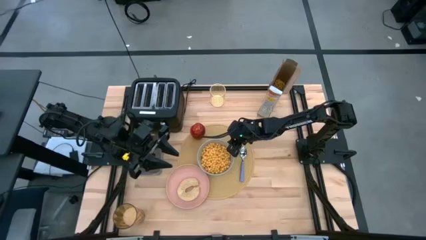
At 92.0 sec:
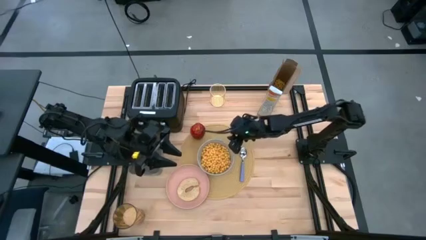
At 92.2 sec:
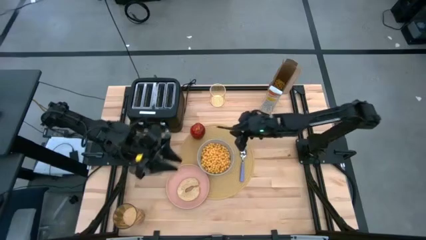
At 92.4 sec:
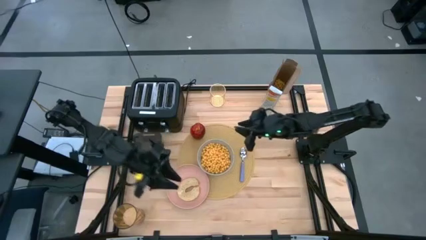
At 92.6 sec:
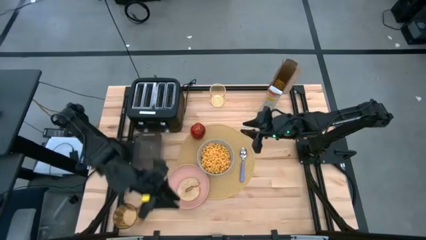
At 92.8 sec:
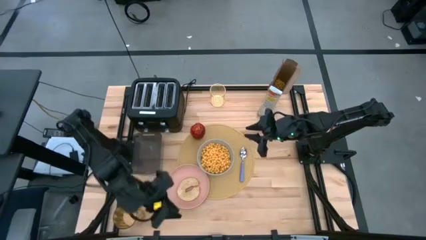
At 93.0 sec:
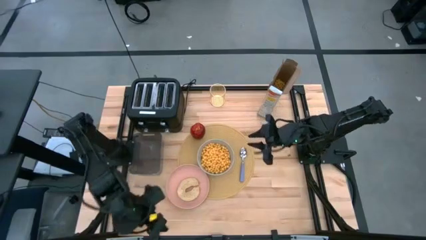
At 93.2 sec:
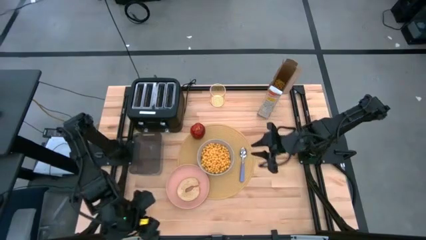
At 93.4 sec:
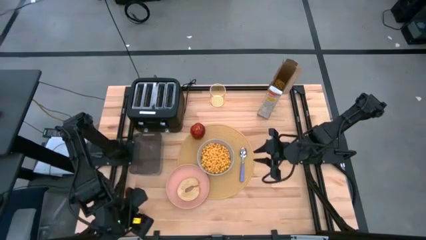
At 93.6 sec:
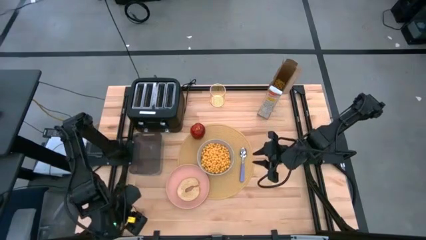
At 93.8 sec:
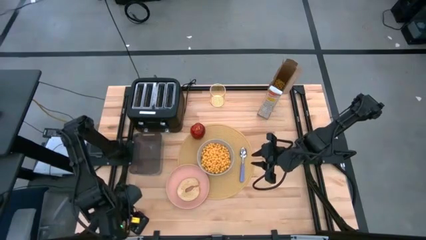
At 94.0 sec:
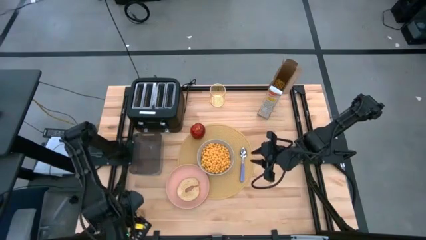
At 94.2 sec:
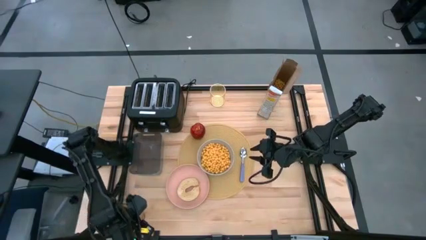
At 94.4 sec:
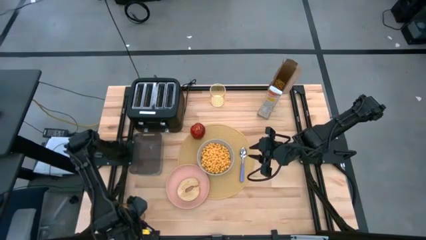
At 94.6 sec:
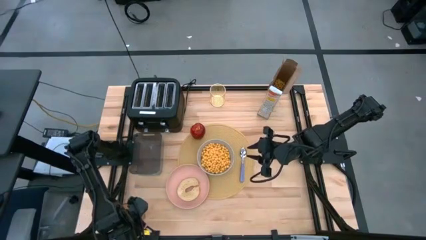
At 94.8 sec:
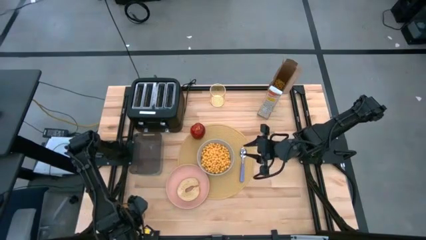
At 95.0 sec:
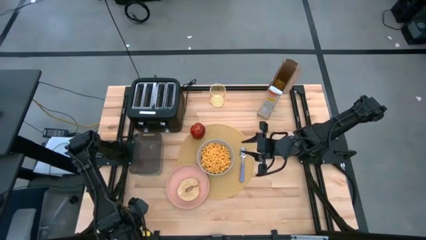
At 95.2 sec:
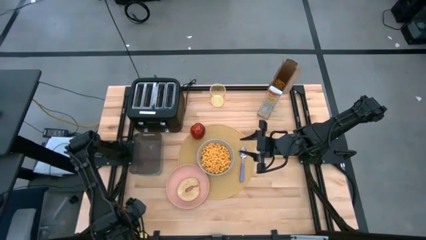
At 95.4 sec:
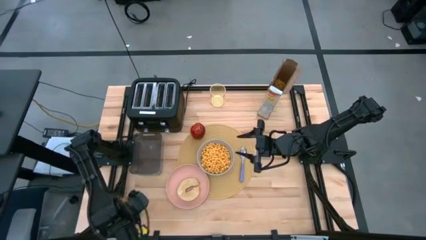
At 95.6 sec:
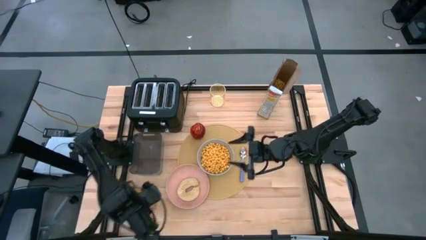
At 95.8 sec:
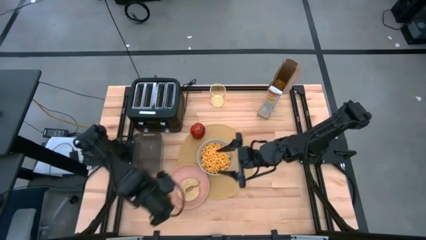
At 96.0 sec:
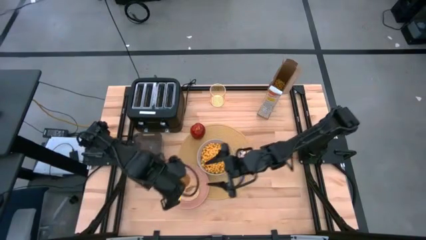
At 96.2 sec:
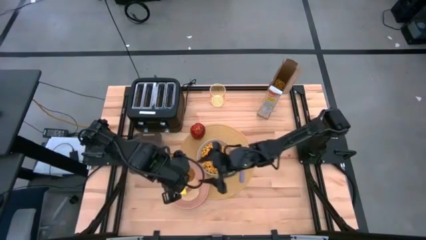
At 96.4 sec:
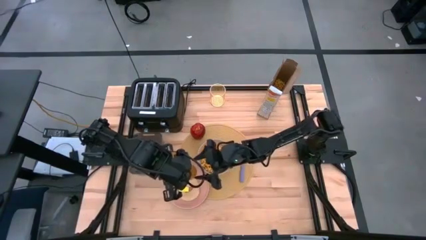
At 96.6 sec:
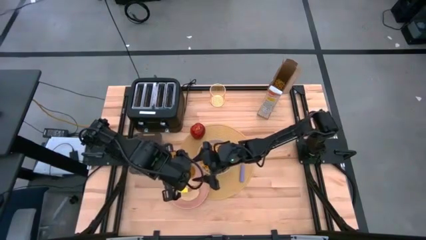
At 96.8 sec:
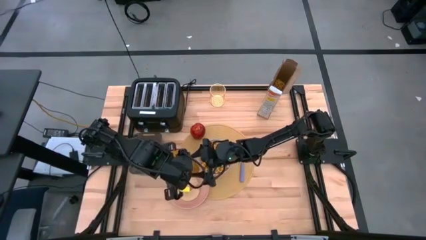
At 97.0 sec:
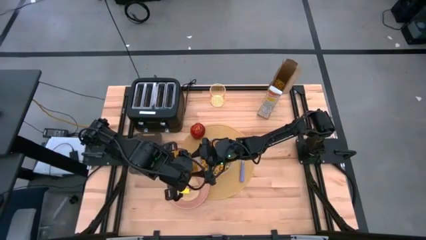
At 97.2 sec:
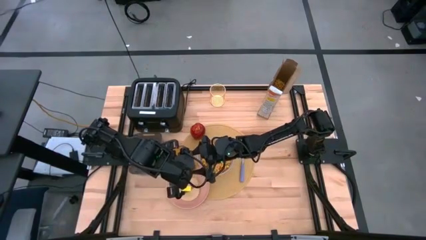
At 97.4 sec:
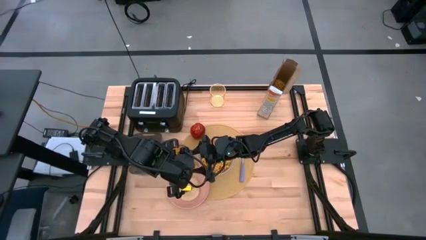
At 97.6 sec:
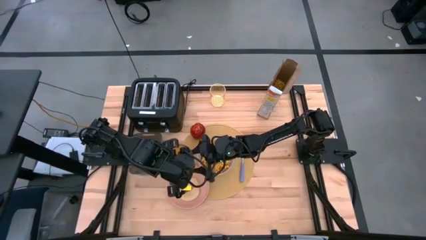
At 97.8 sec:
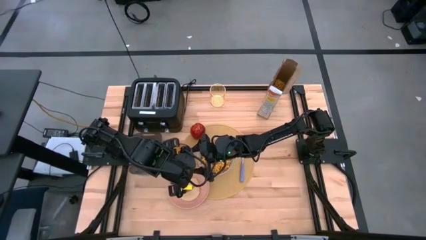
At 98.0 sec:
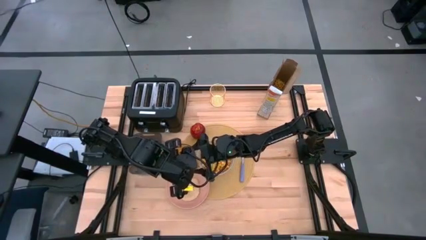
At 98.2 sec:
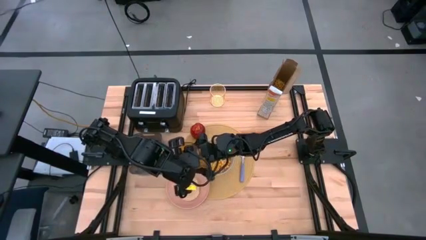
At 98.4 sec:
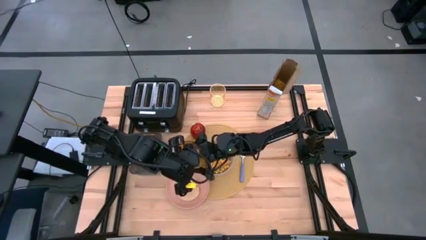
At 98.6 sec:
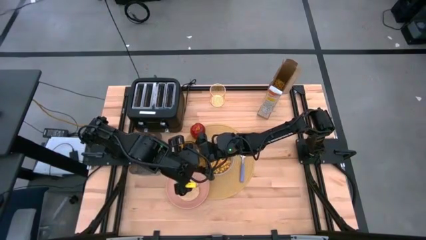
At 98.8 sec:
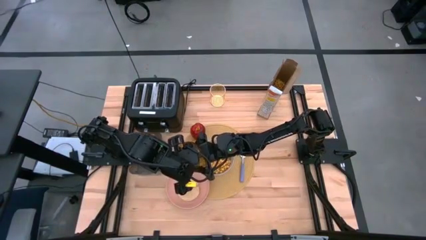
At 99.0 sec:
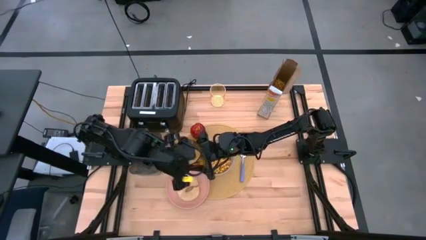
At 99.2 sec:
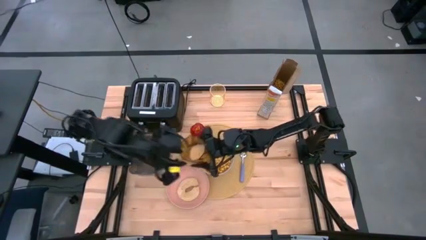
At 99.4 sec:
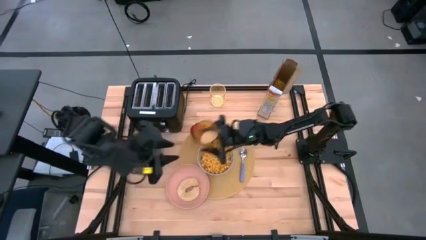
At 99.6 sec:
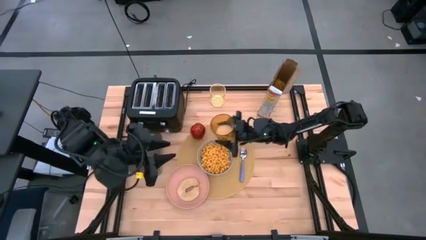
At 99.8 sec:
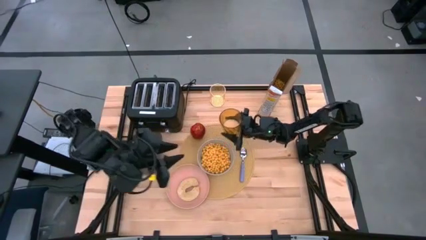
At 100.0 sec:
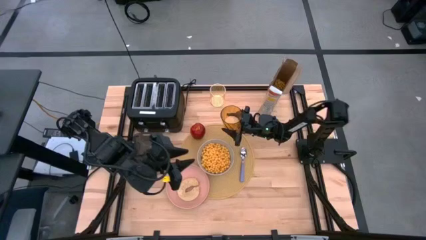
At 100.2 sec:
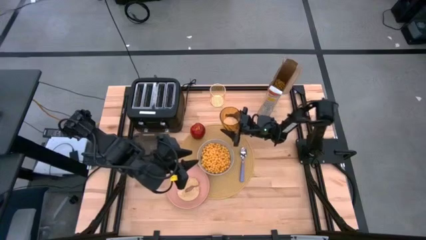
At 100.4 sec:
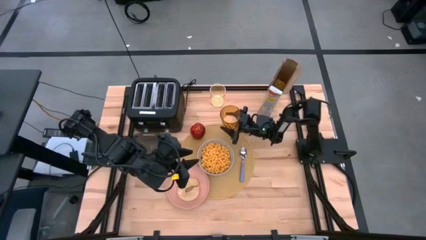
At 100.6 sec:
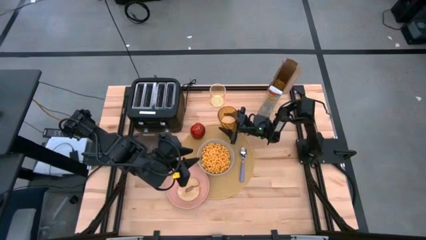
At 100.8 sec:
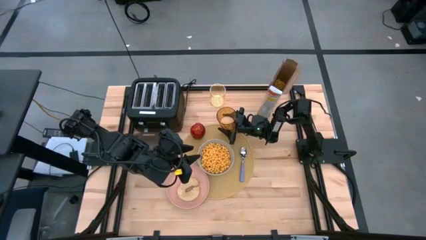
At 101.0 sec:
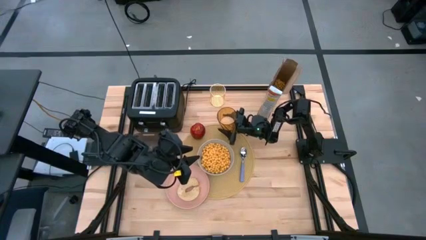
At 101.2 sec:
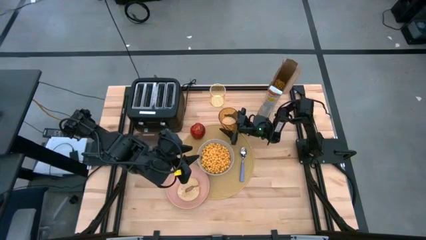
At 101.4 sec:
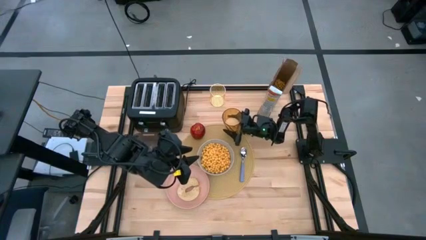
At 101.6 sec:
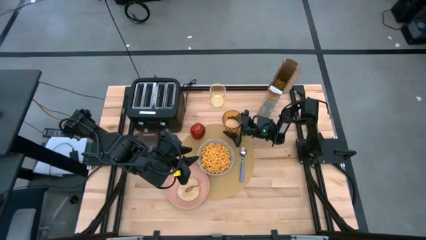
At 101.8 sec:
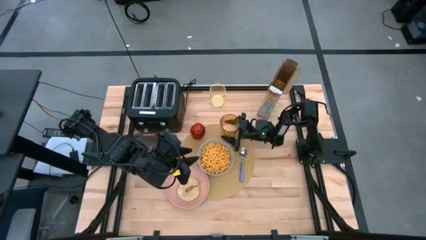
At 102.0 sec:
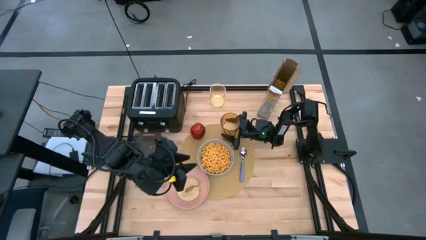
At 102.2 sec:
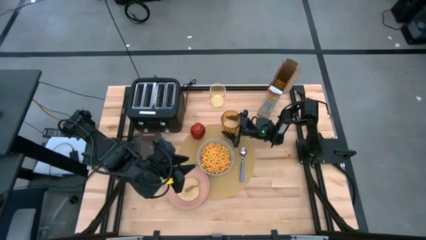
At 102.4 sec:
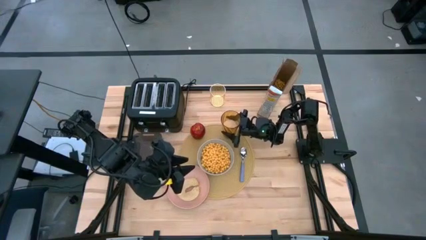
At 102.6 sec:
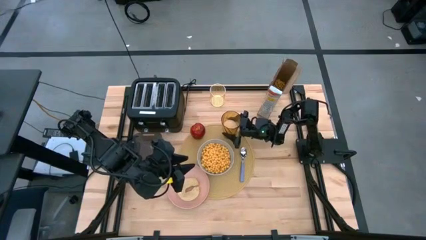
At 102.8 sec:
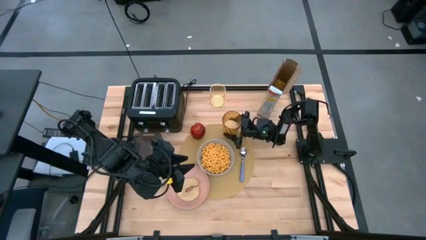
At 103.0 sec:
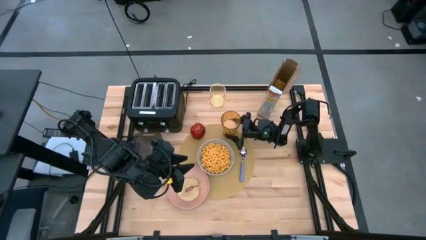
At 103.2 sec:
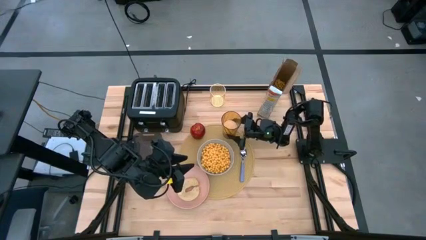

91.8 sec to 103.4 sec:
Task: Arrange a breakfast setting
Put the orange cup on the table mat to the top right of the gray bowl

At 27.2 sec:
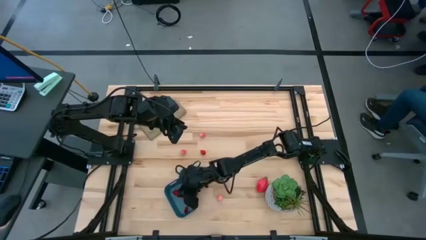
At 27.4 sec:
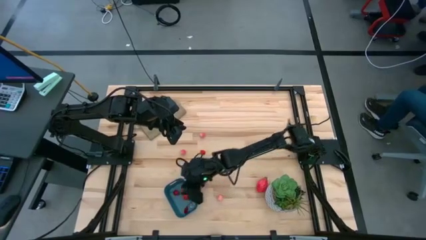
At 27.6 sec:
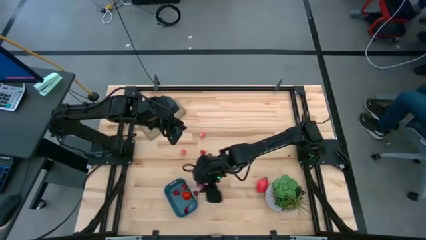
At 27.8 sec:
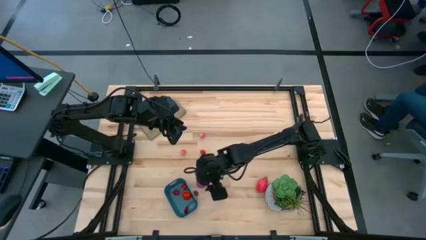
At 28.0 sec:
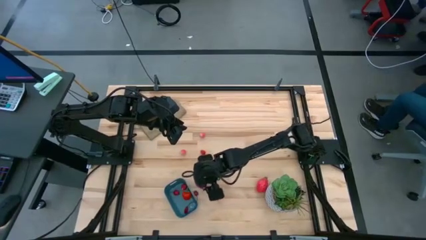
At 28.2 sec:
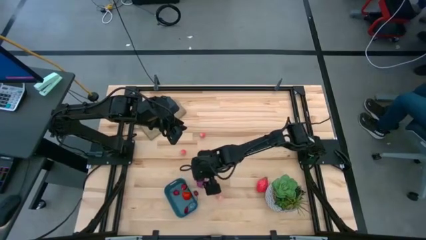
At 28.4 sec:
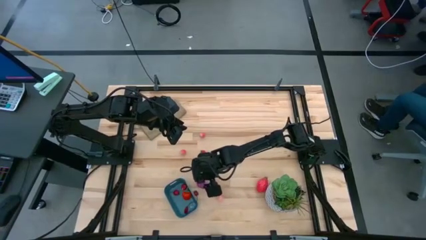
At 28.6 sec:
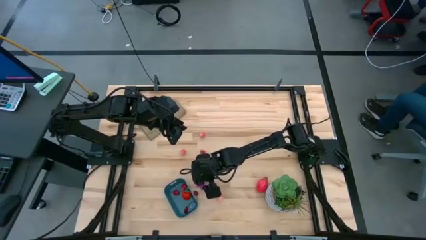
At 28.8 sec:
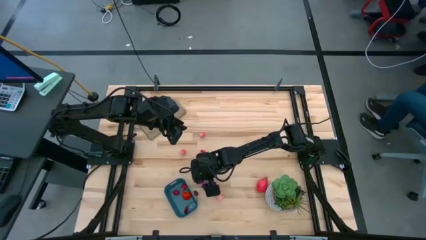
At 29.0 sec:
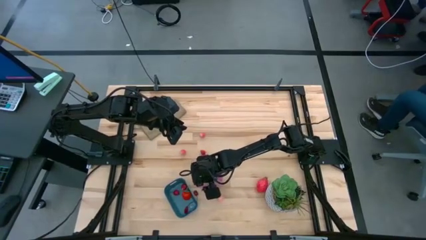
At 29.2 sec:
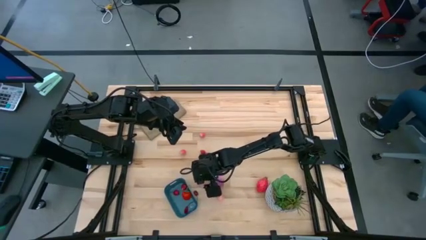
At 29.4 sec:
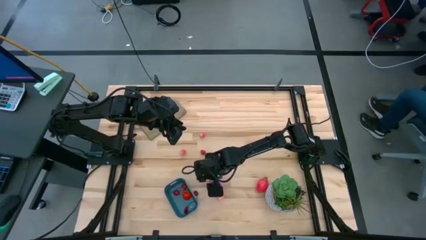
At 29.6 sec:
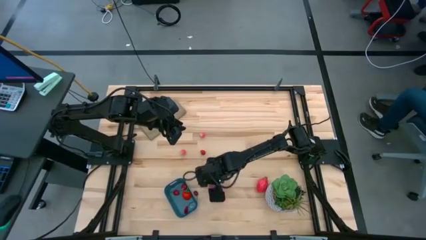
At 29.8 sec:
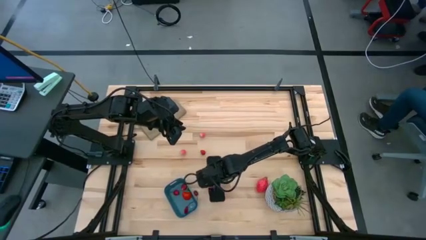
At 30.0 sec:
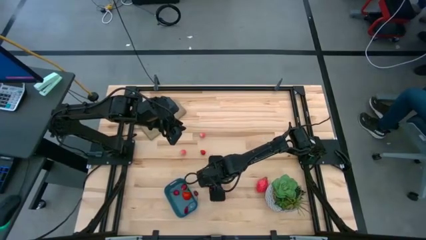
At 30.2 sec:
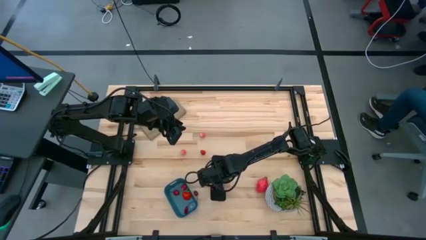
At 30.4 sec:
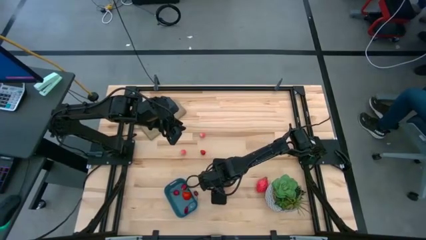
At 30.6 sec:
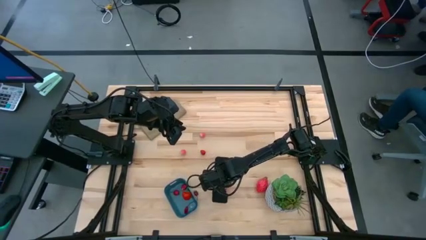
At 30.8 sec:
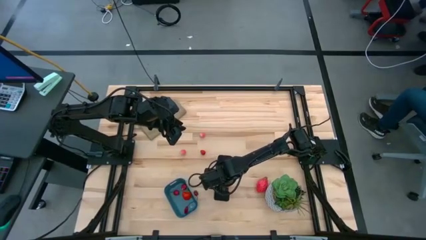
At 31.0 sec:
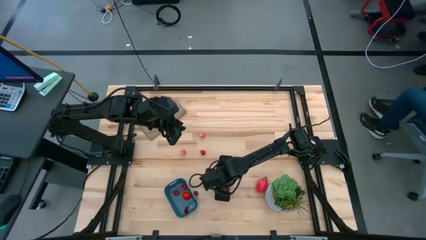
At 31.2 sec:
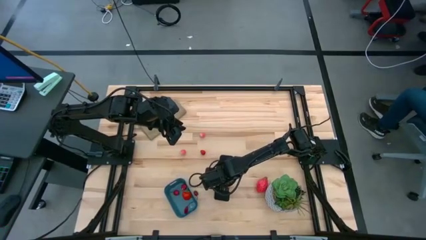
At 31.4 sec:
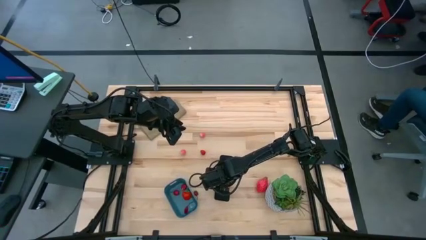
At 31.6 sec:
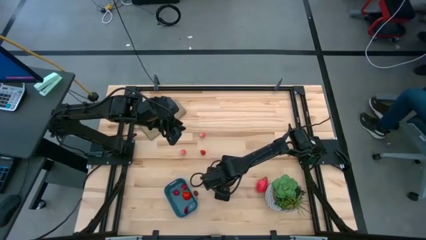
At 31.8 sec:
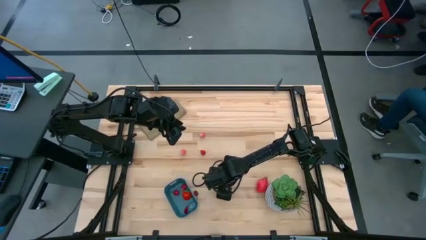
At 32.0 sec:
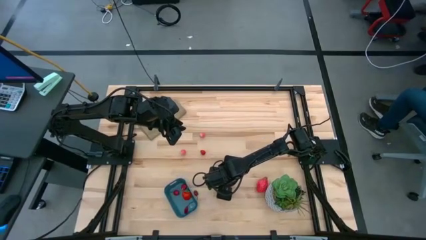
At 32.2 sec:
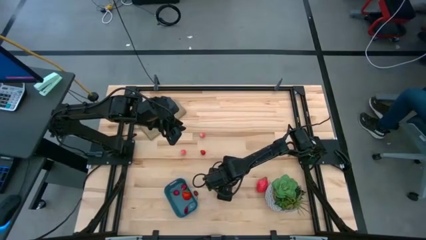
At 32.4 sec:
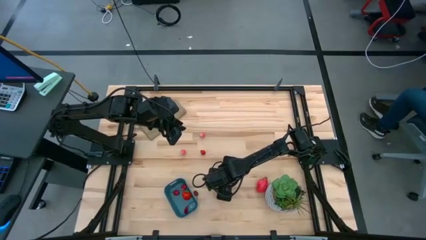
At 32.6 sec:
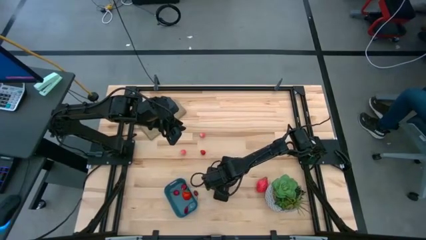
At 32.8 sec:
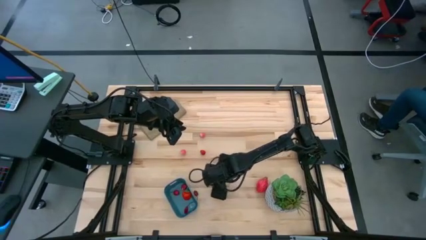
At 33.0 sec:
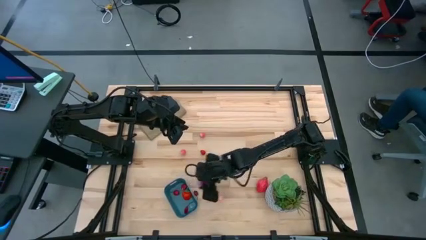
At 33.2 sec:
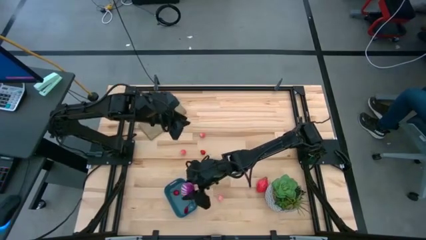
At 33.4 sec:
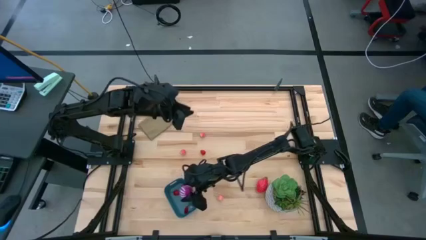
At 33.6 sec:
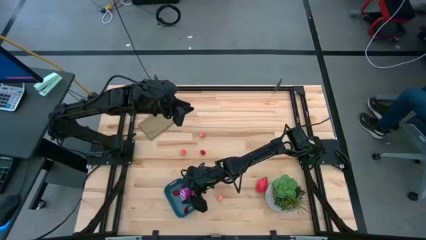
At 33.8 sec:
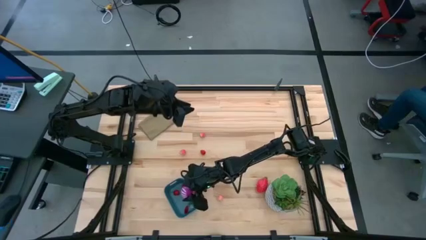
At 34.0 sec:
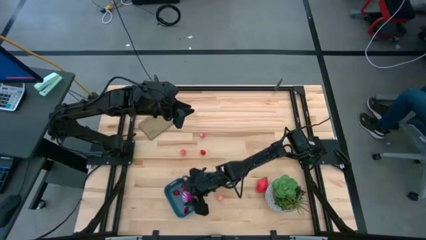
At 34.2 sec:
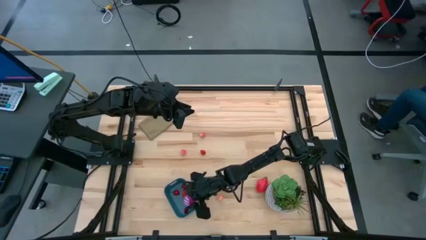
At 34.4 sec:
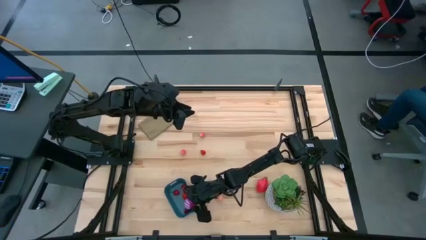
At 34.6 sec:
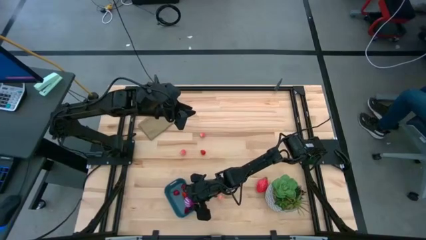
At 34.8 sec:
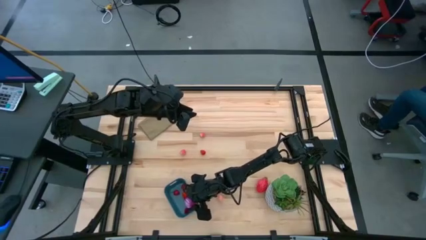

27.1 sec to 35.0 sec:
Task: Pick and placing Produce into tupperware
Put the purple onion into the blue bin
